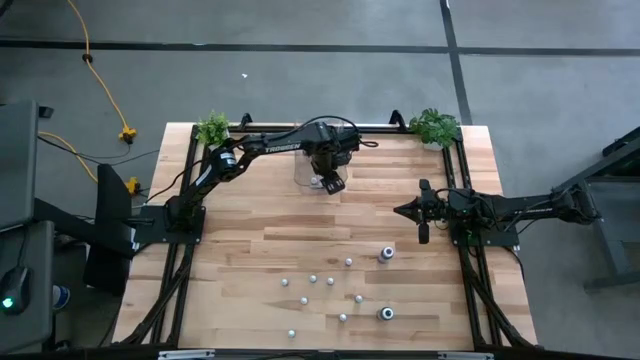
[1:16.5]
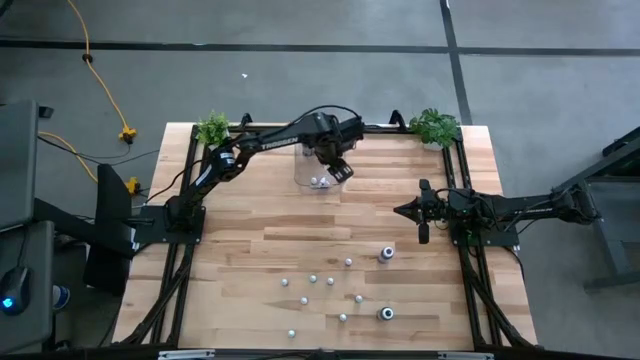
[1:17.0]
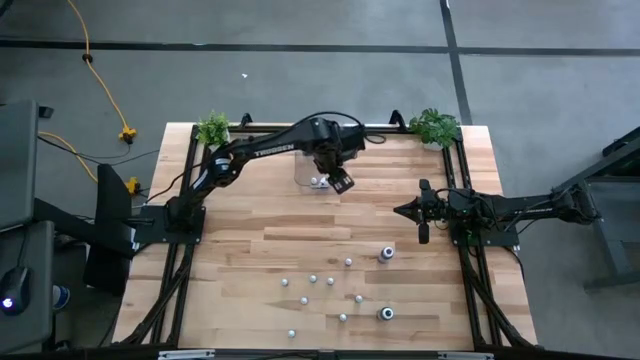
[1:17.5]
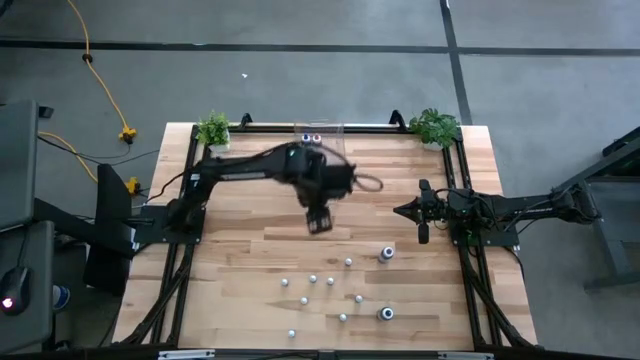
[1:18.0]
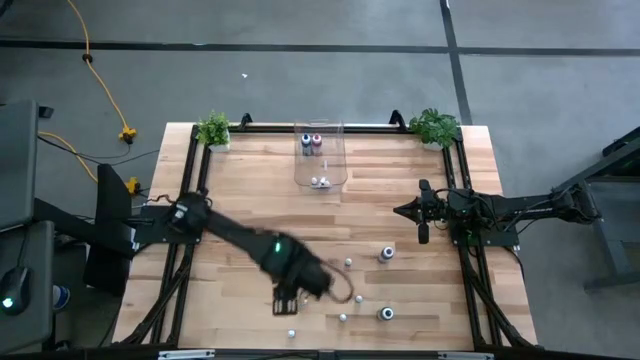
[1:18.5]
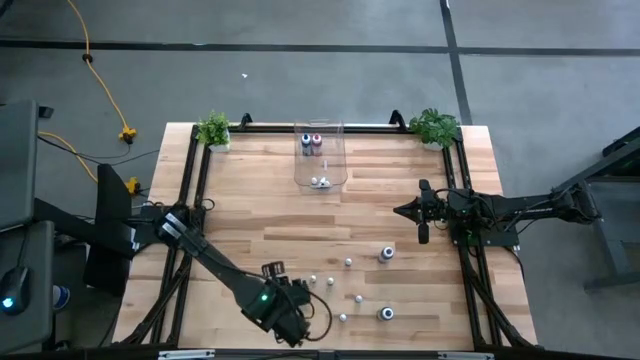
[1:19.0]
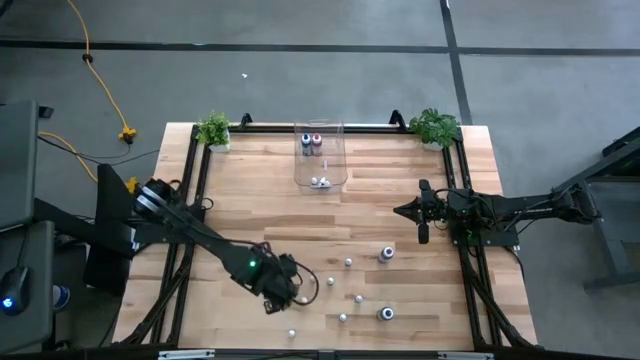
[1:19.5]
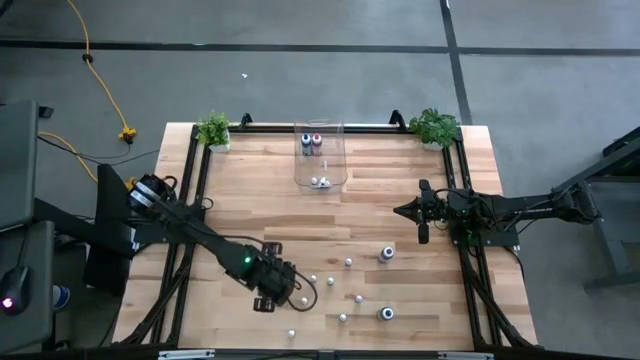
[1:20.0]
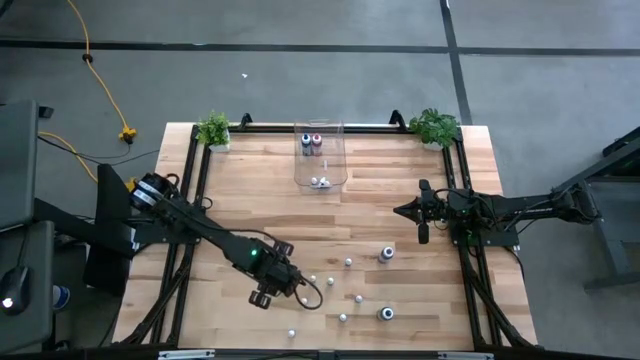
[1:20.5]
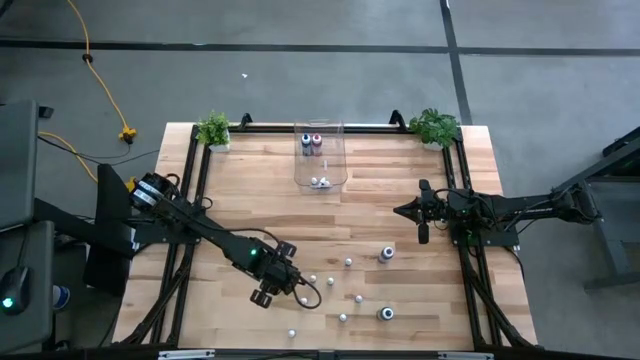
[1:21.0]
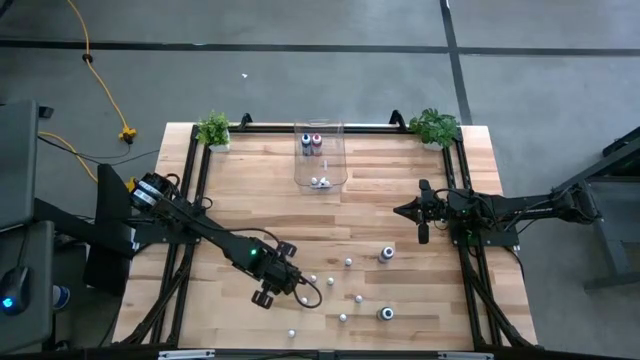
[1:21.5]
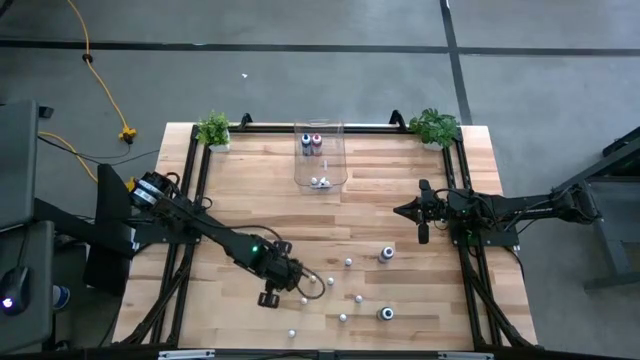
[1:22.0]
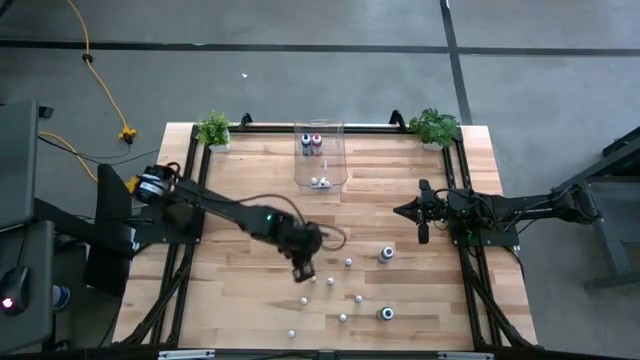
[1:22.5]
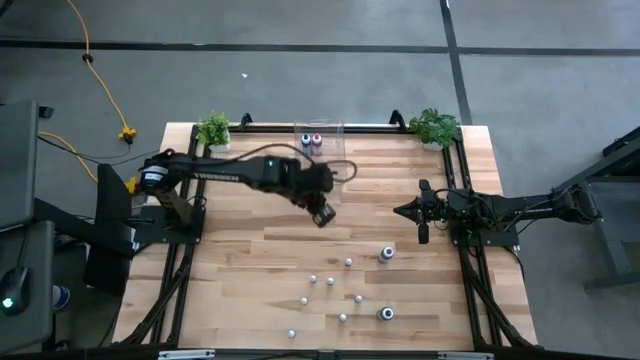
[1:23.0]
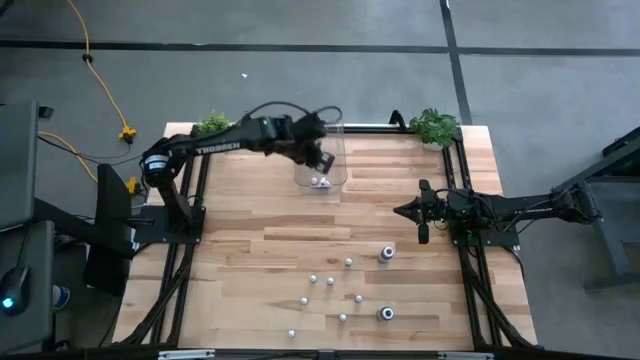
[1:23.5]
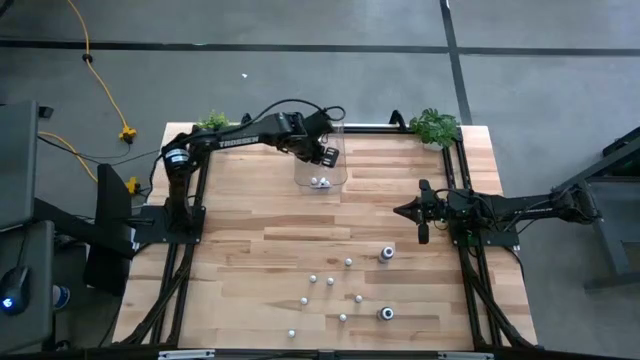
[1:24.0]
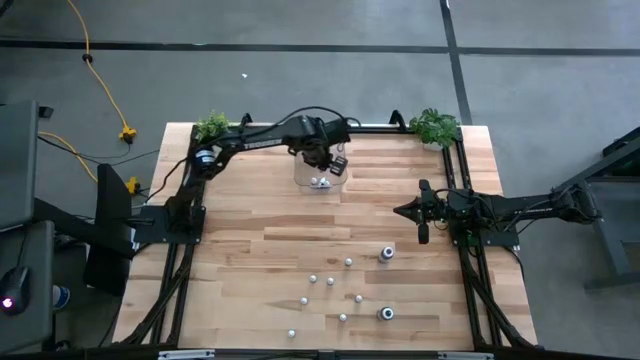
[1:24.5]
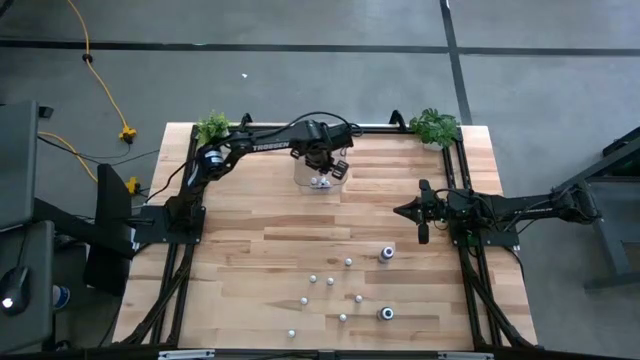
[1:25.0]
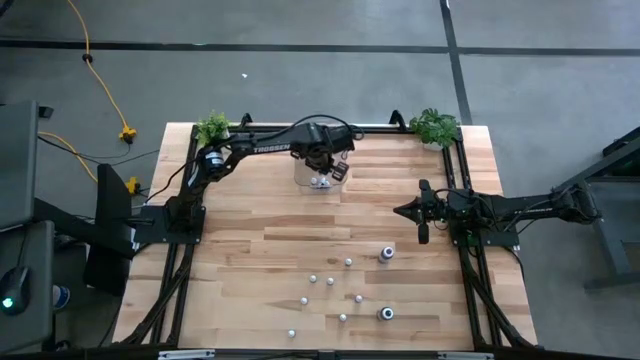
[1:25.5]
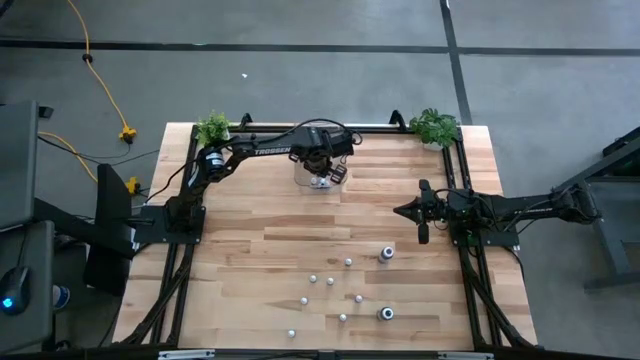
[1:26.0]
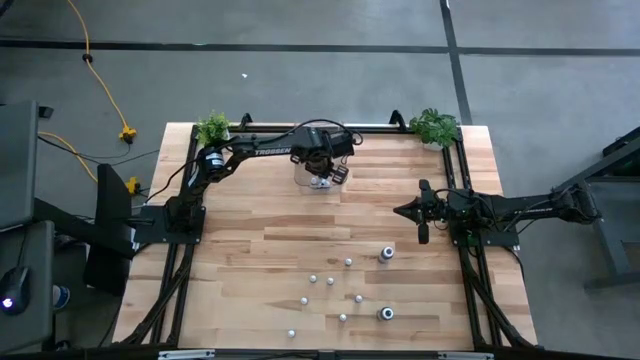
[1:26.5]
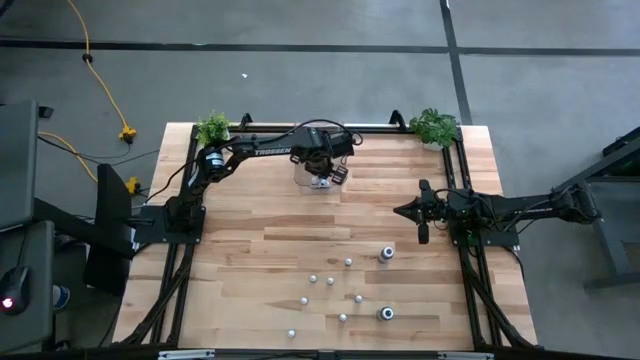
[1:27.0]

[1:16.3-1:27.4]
Task: Pick & Place food coloring
Put the small black food coloring into the transparent bin

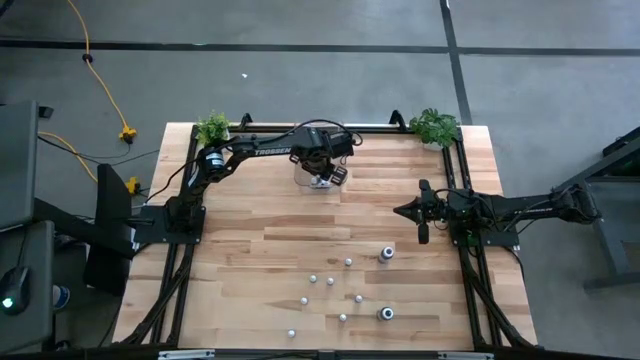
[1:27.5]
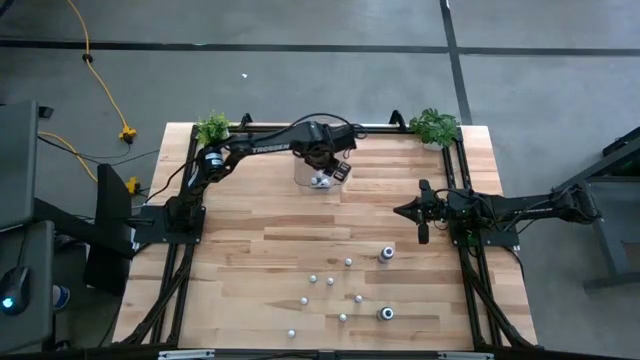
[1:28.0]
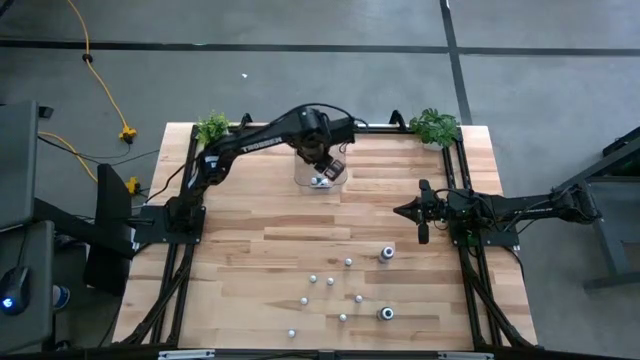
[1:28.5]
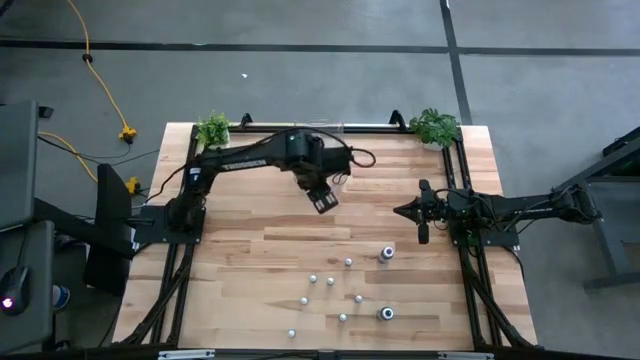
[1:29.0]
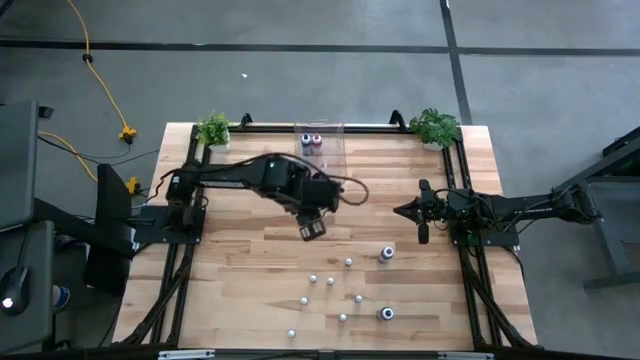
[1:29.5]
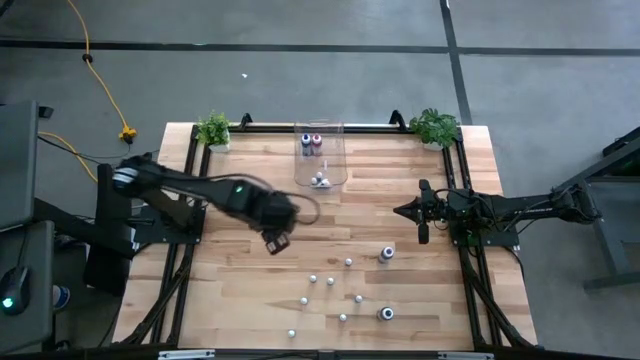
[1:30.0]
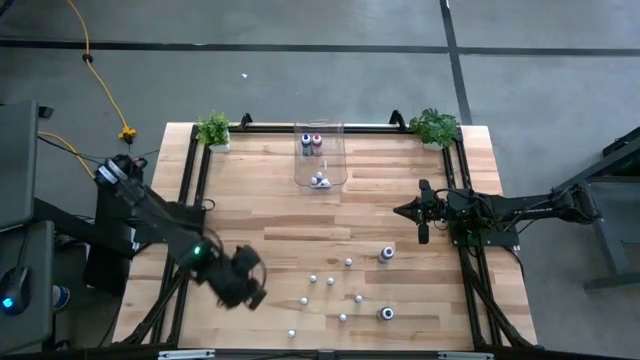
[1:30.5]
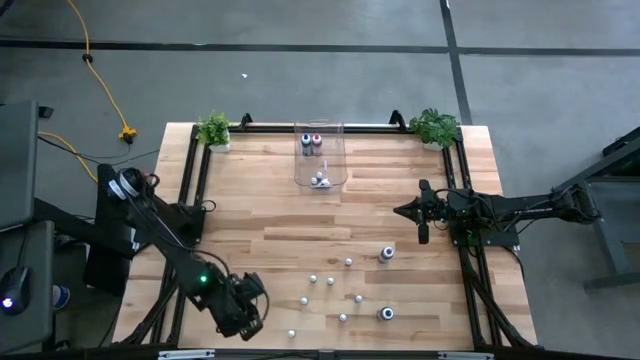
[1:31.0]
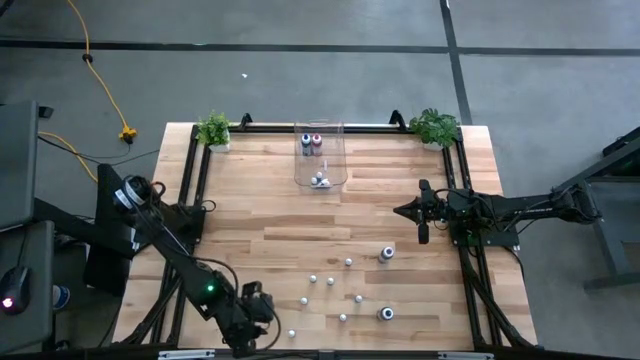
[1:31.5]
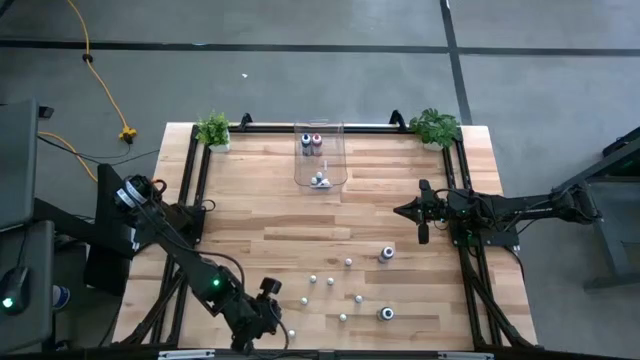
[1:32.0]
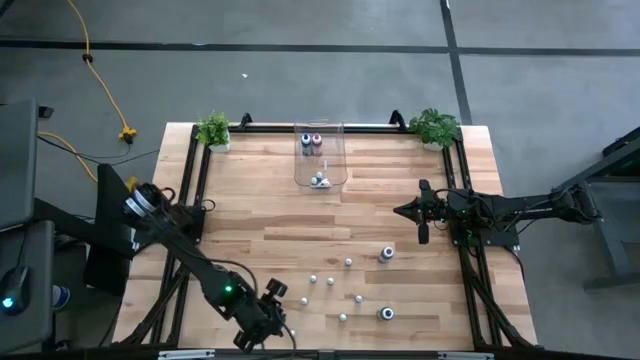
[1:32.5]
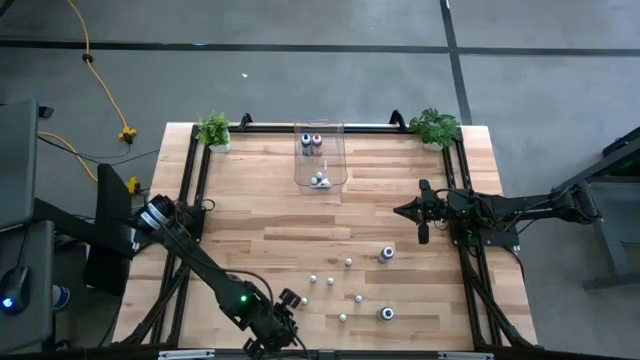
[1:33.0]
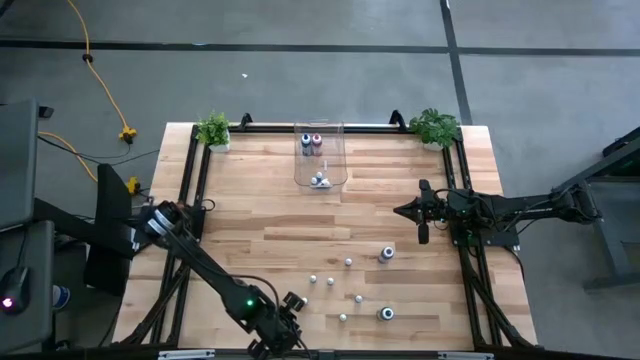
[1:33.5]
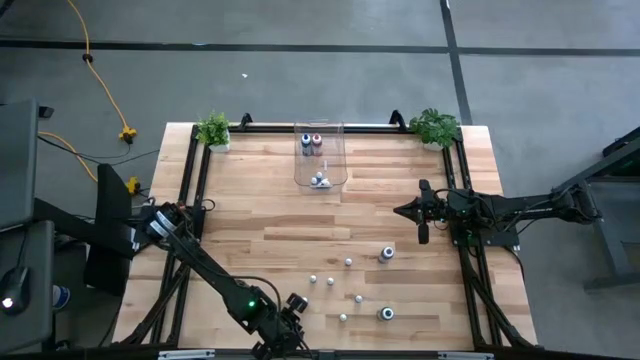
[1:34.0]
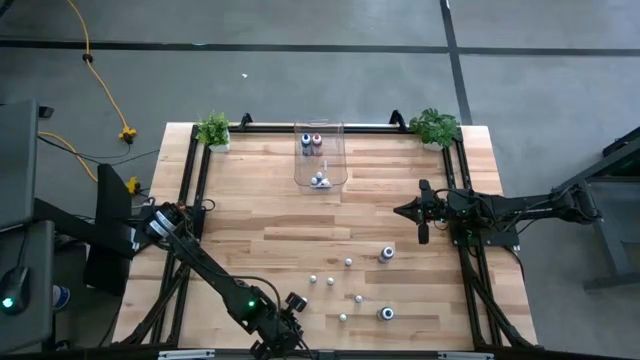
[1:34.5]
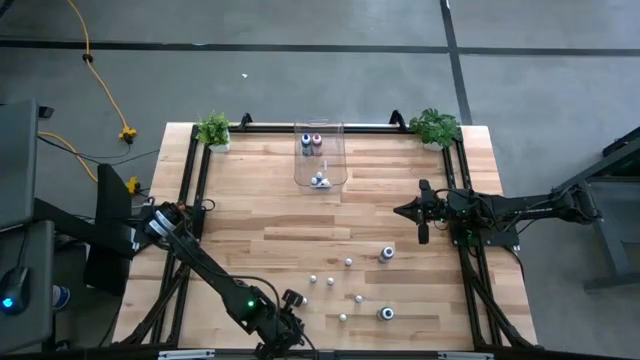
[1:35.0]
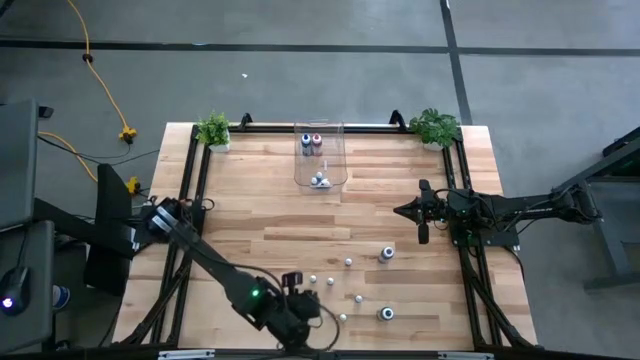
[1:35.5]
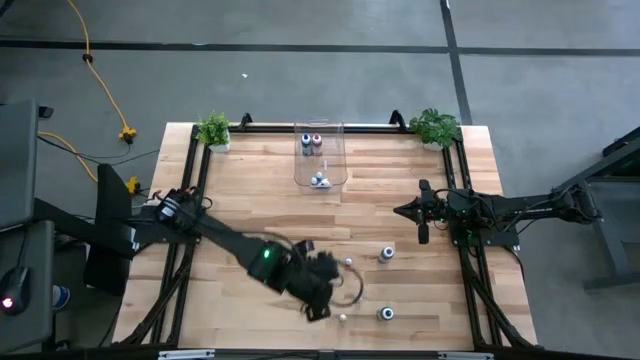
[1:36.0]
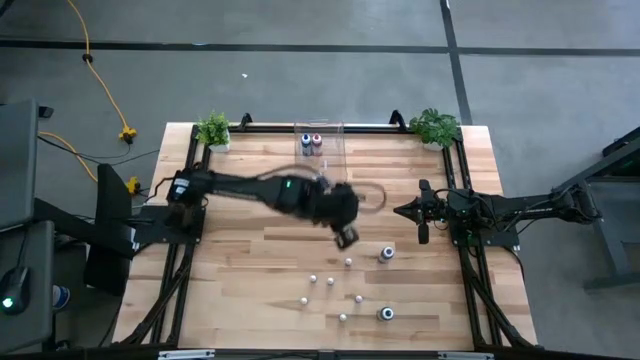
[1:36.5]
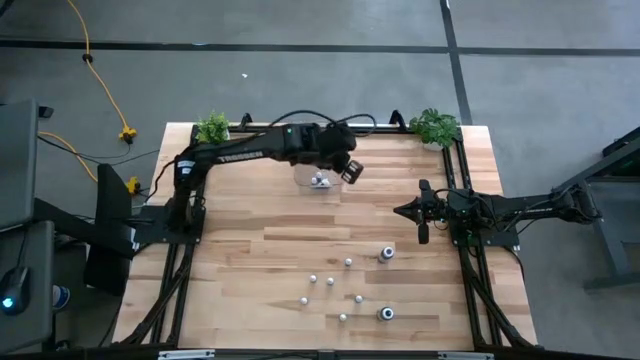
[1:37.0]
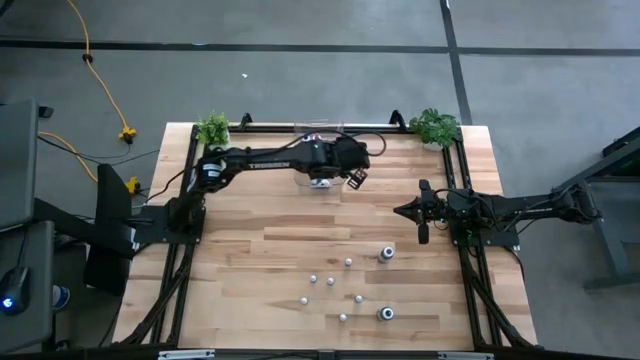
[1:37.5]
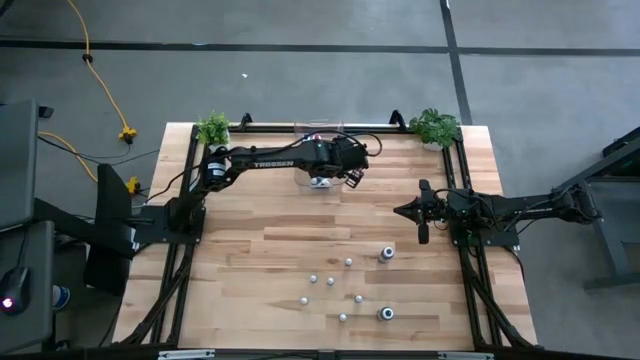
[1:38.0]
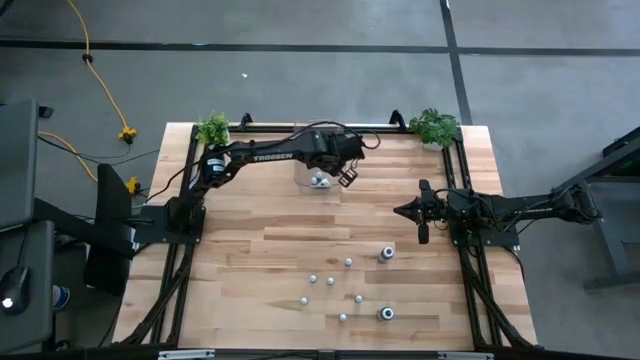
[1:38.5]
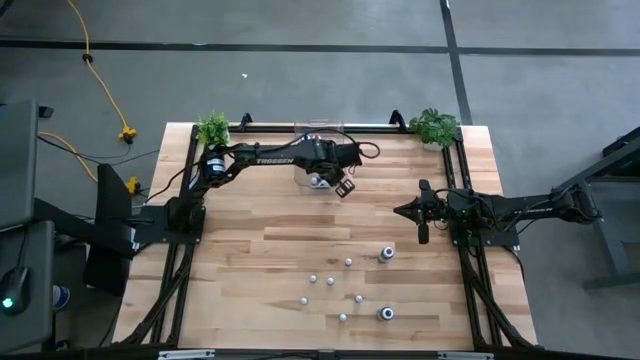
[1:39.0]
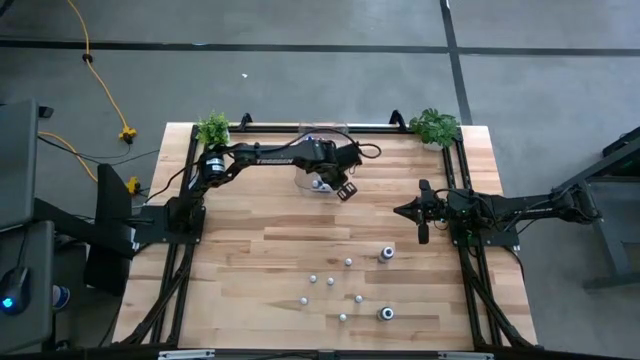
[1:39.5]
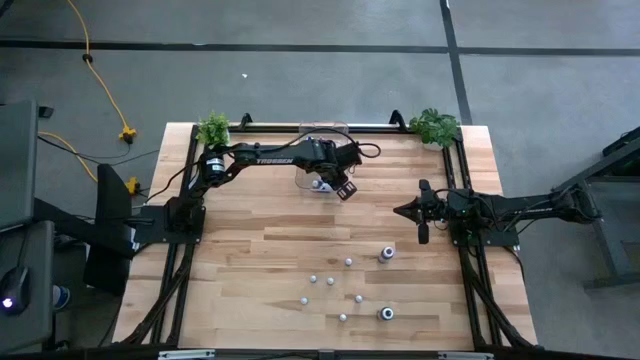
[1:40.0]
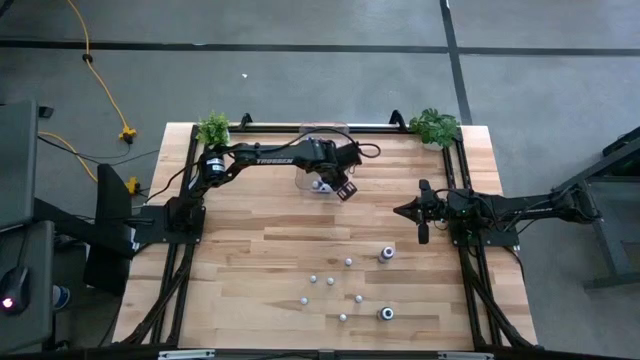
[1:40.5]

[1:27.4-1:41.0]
Put the small light green food coloring into the transparent bin
